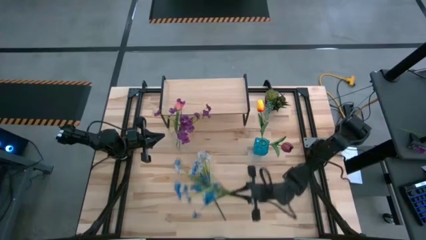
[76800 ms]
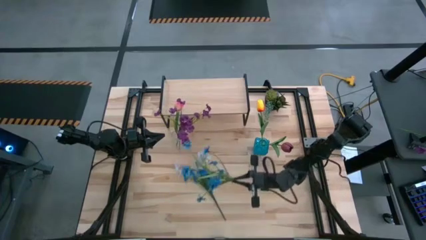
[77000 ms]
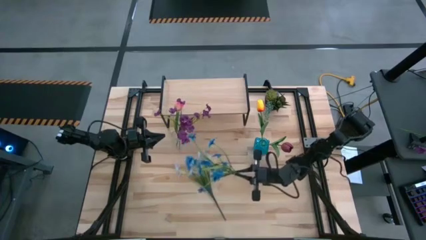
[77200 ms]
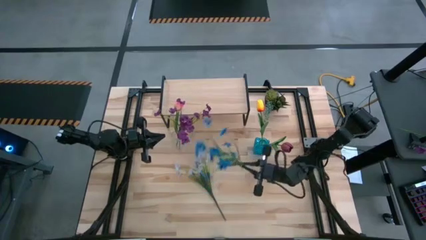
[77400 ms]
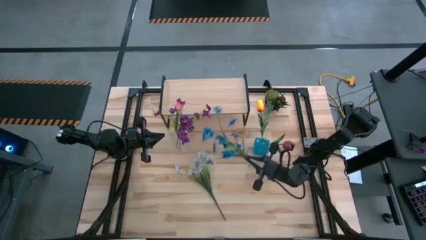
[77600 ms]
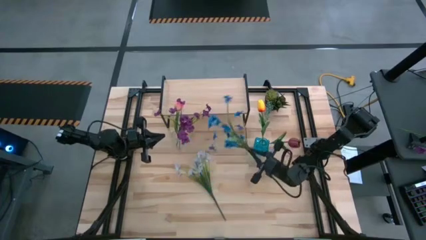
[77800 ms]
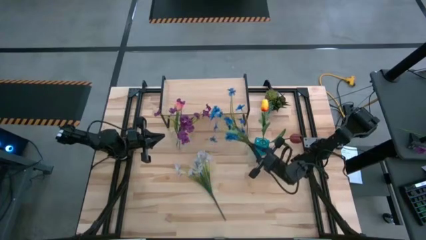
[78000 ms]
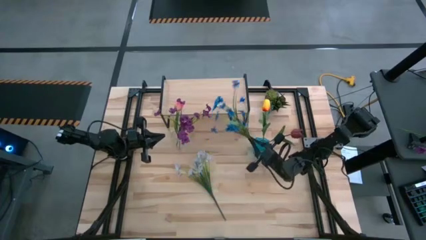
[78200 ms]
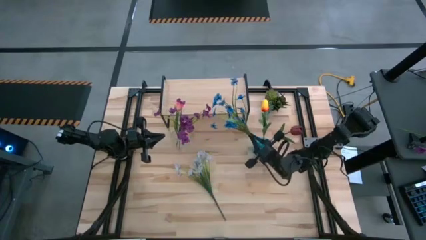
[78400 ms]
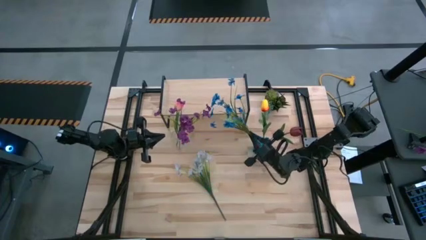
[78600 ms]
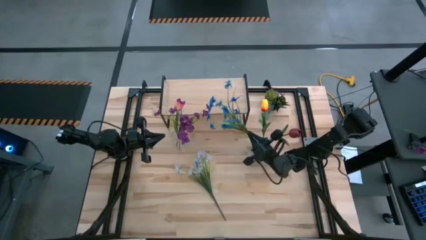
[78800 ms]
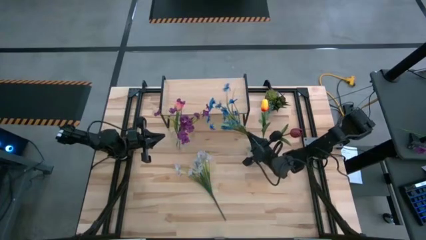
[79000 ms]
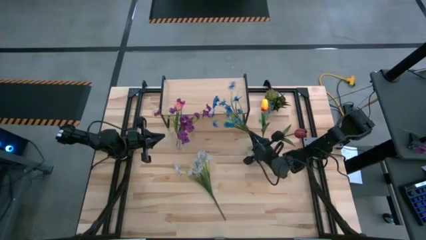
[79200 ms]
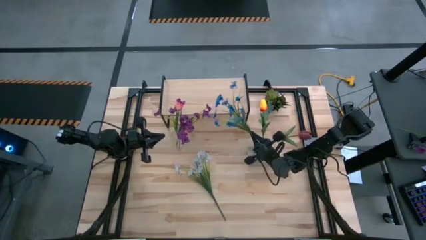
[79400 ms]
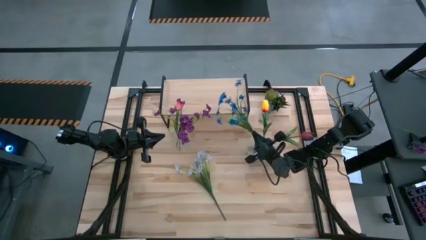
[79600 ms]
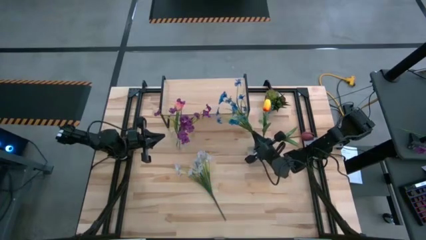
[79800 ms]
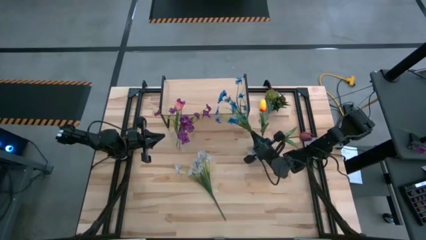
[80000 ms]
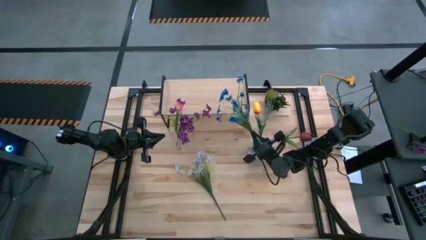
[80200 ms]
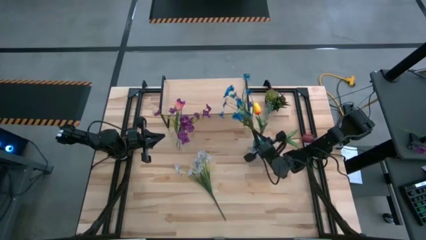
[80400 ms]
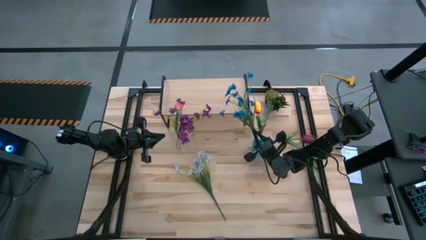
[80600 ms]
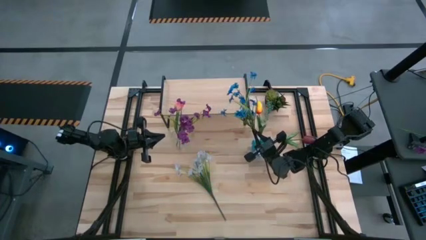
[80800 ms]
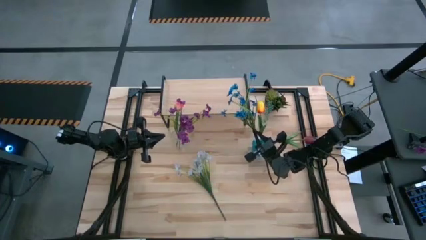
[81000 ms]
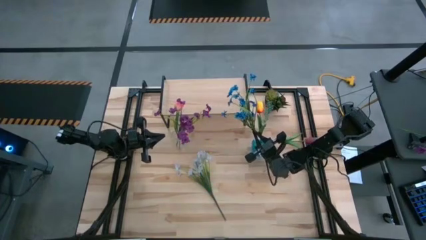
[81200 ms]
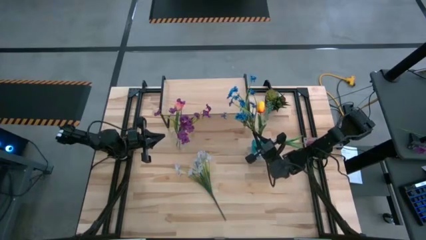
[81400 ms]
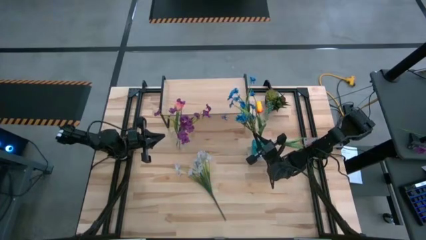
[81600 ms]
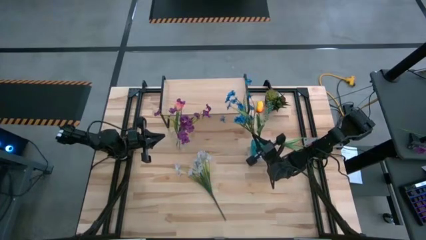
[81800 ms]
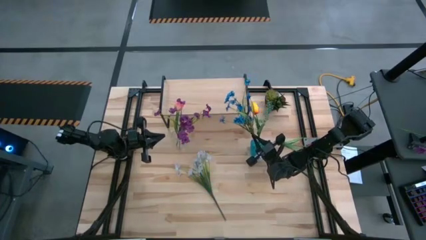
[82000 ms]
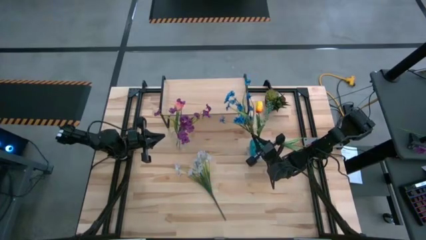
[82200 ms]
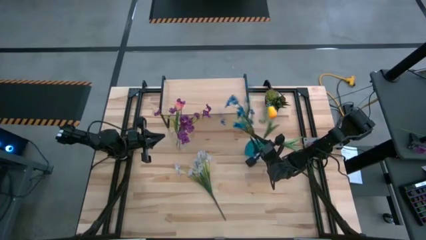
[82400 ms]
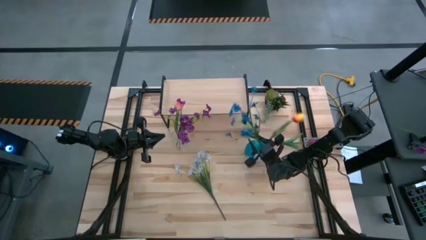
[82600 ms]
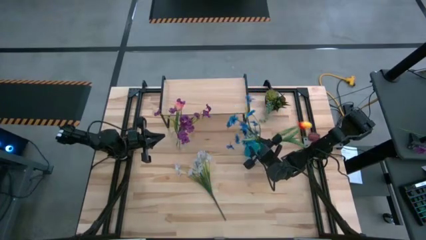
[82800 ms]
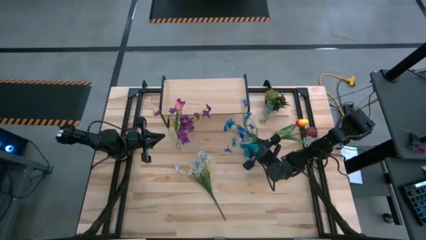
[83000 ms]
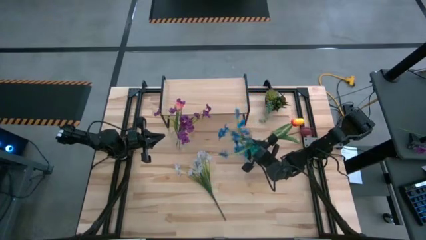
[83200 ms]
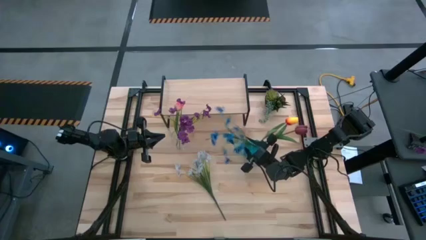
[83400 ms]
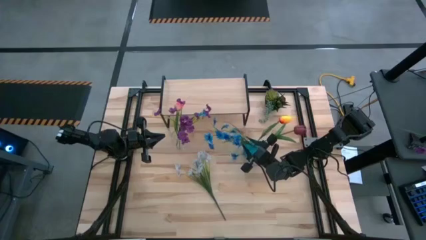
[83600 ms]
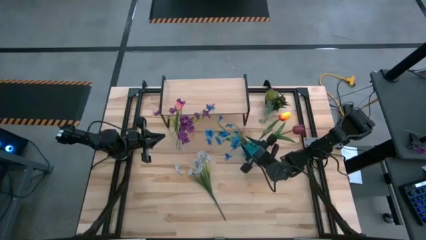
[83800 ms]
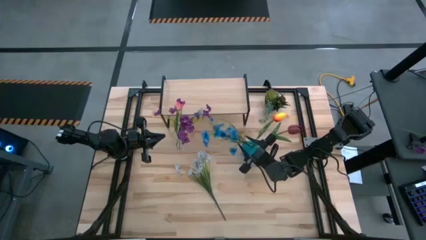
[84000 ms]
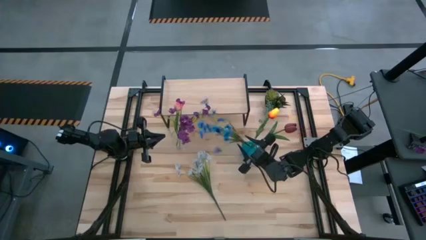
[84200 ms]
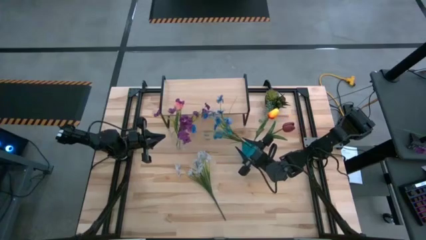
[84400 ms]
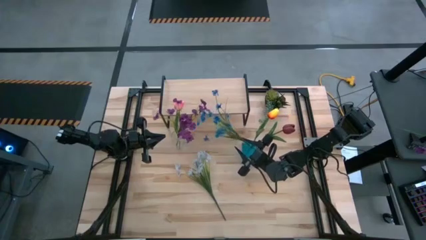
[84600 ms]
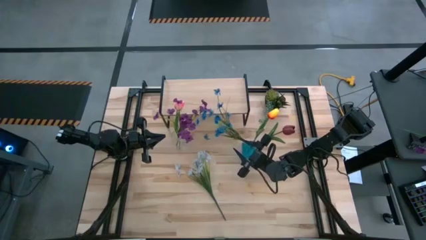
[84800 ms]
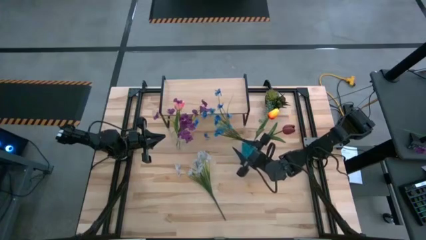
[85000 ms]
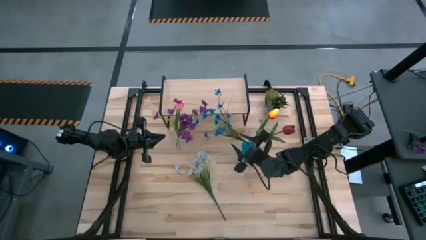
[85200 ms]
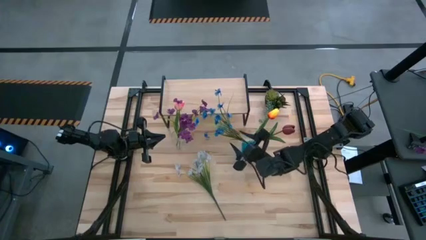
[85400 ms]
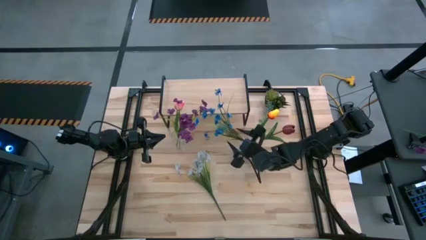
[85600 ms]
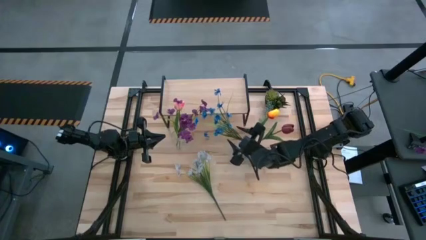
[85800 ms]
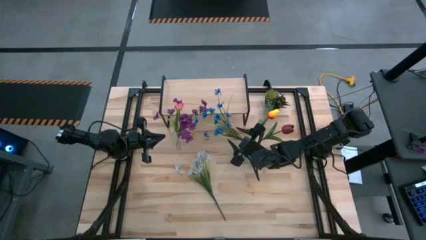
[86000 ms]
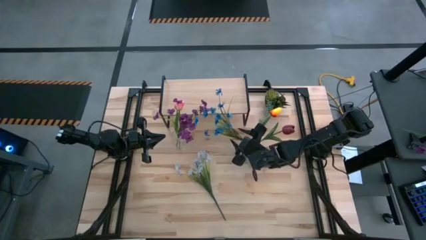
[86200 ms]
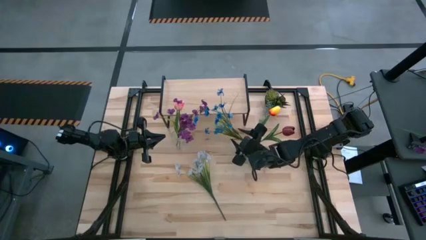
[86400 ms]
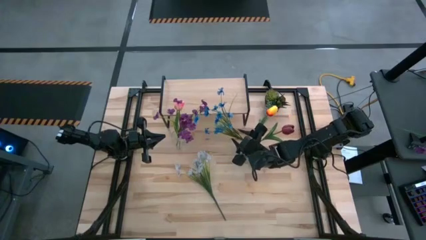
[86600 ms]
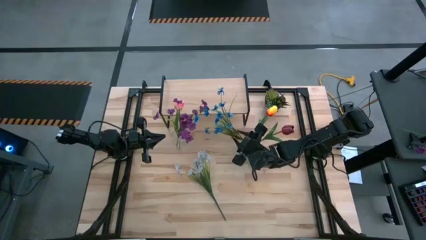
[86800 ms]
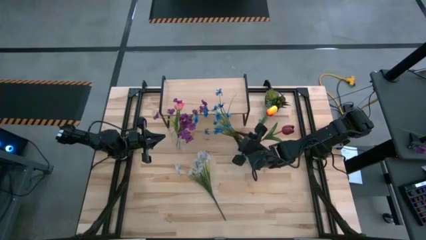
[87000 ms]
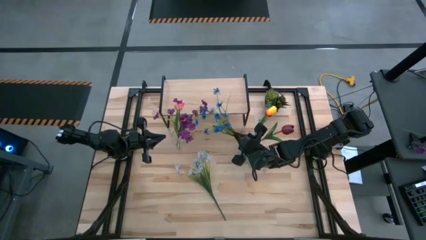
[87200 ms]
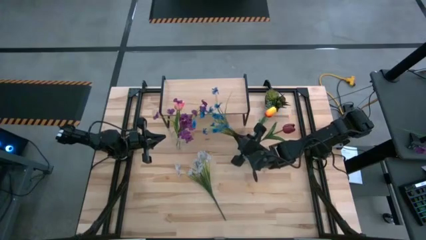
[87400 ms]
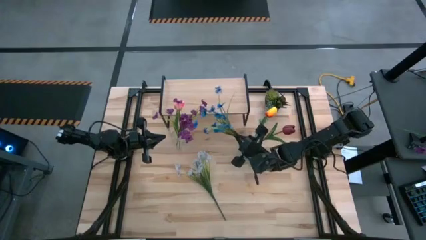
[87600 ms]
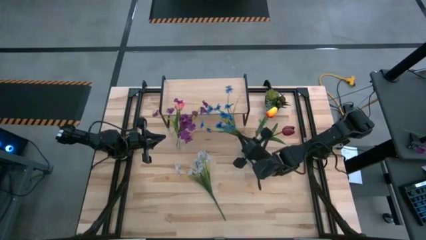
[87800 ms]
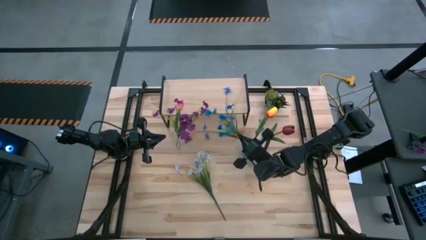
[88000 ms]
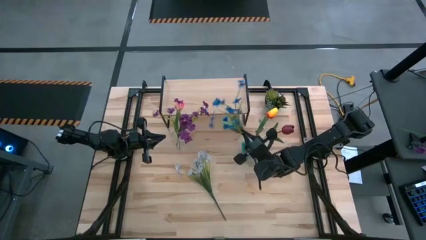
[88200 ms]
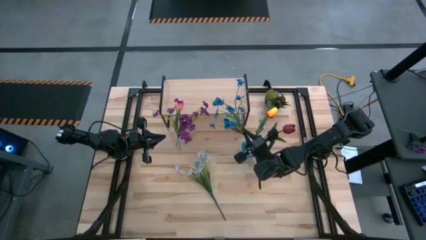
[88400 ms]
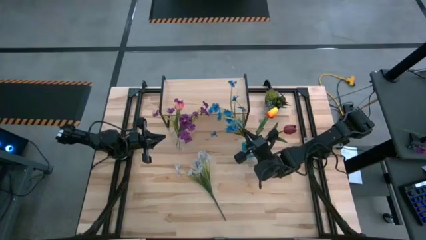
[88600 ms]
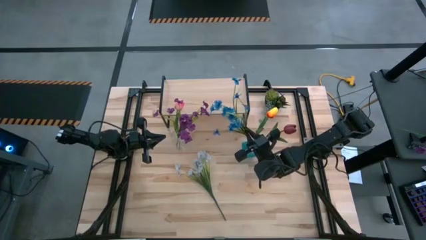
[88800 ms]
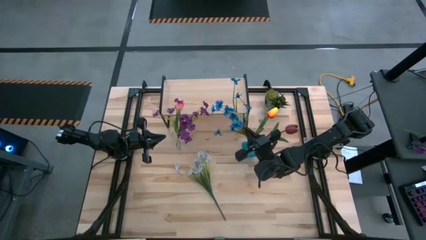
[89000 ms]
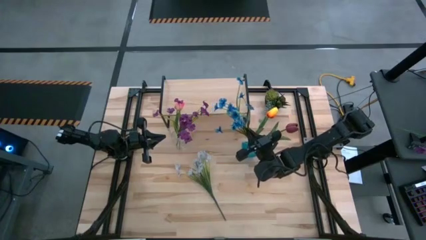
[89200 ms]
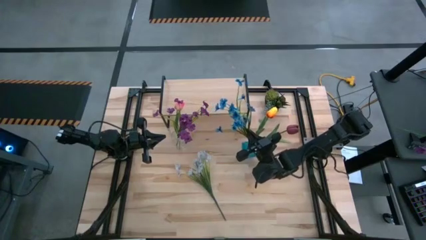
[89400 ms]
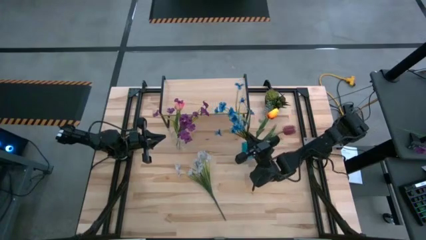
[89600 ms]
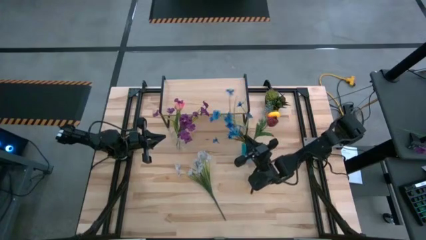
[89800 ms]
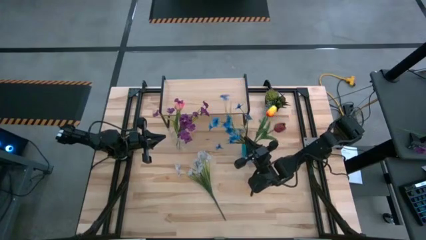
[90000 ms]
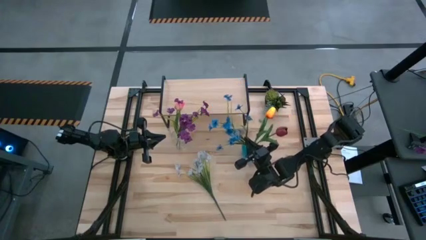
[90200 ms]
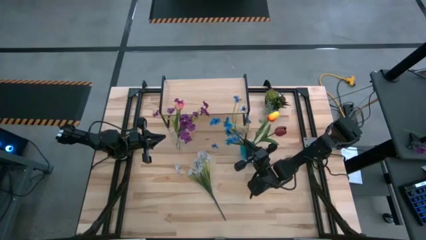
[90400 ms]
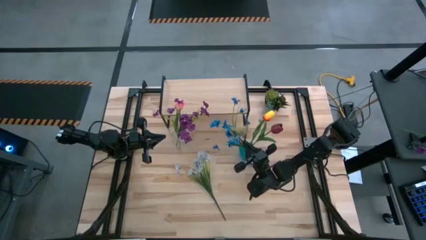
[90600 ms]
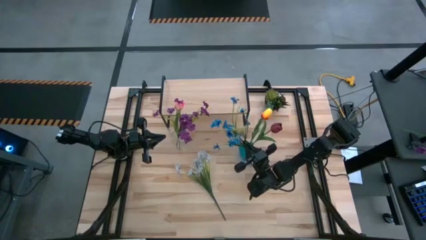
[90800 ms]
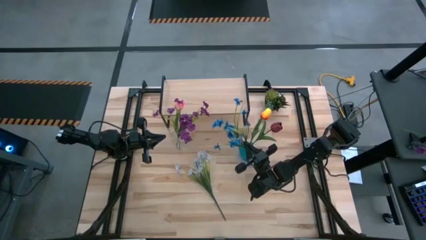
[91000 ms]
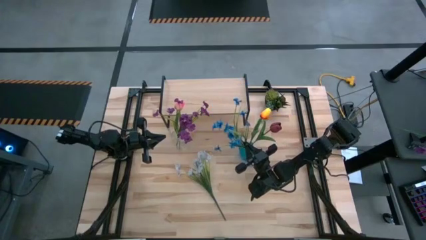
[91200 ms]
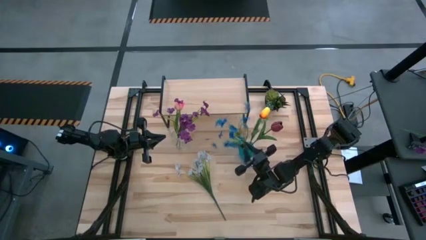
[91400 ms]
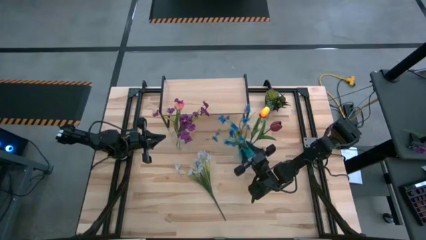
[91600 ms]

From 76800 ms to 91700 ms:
Task: Pick and place flowers into a vace then onto a shelf
Put the blue flower into the blue transparent vase

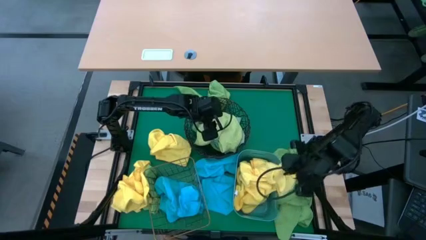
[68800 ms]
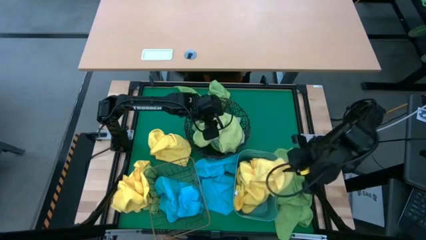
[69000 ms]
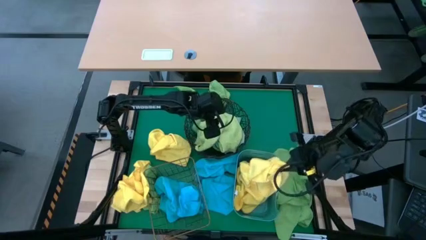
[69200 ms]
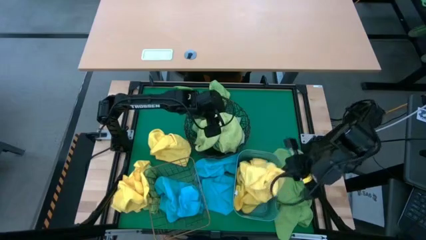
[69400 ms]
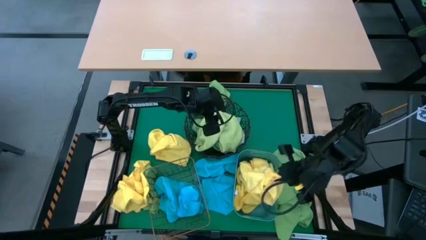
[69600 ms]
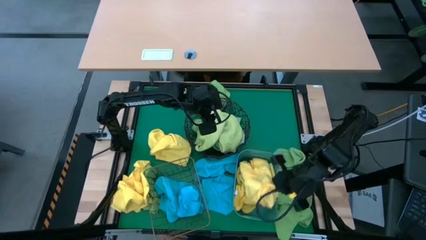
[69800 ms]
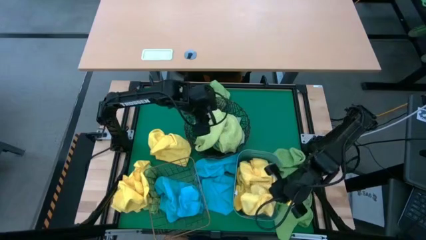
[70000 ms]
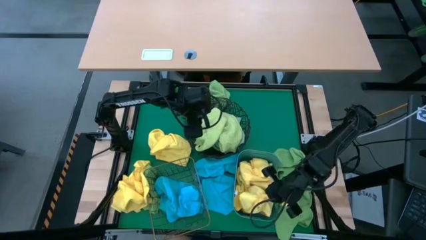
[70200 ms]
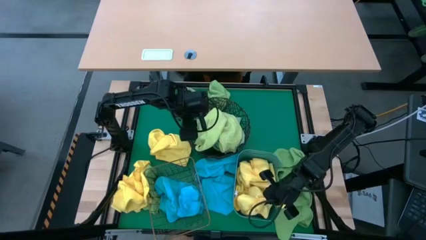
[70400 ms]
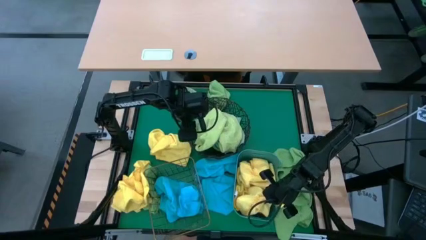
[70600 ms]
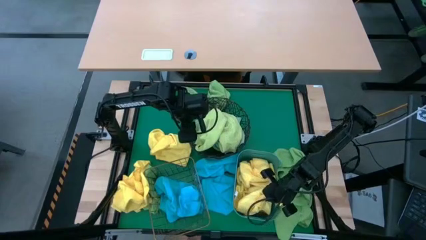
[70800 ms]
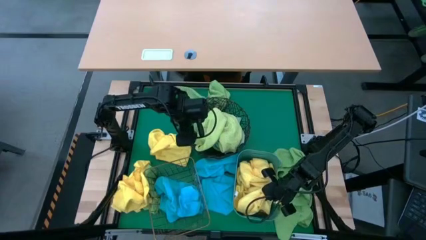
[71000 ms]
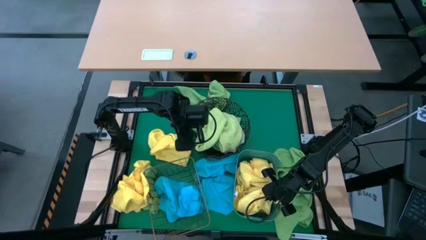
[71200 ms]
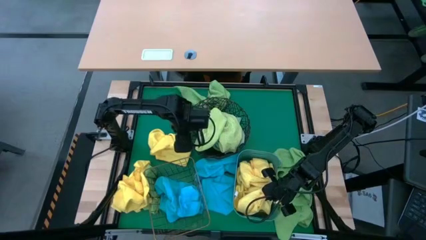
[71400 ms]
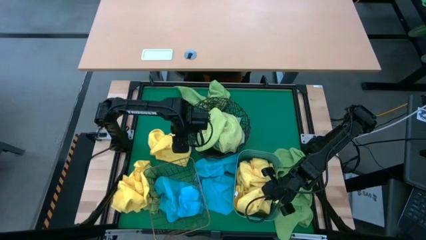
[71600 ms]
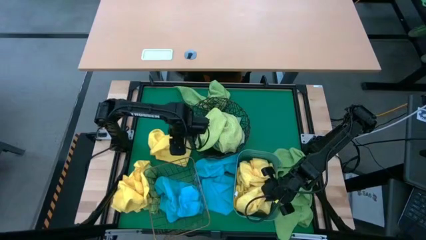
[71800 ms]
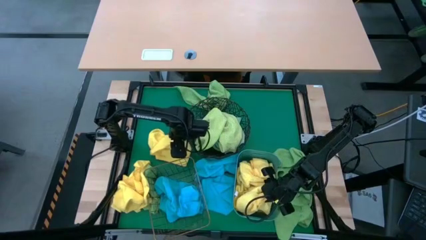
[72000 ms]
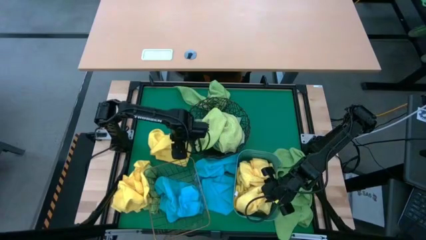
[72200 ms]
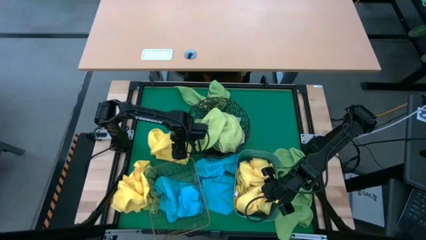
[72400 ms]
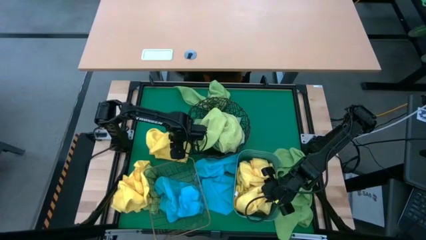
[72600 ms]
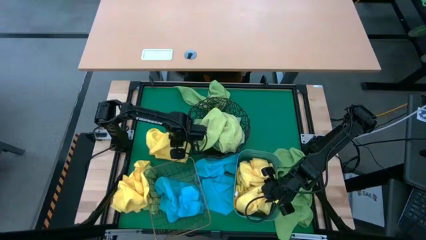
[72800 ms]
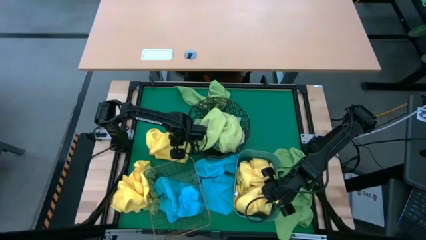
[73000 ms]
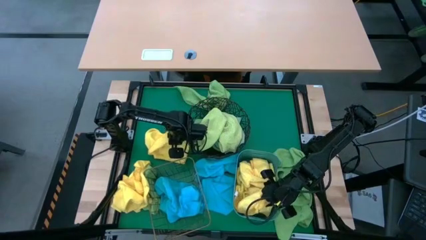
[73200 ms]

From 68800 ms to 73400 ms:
Task: Sort microfiber towel by color & place in baskets
Put the yellow microfiber cloth into the blue bin
